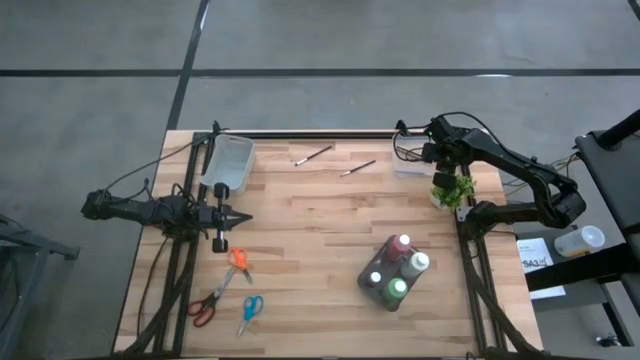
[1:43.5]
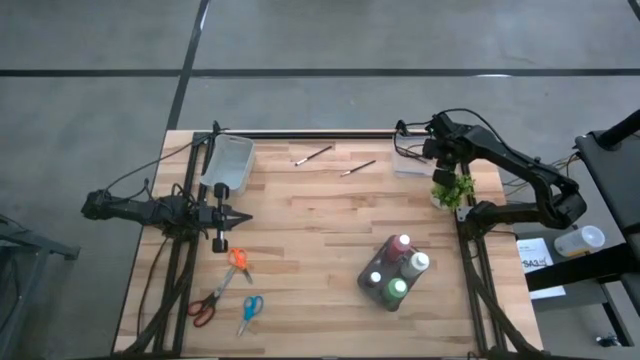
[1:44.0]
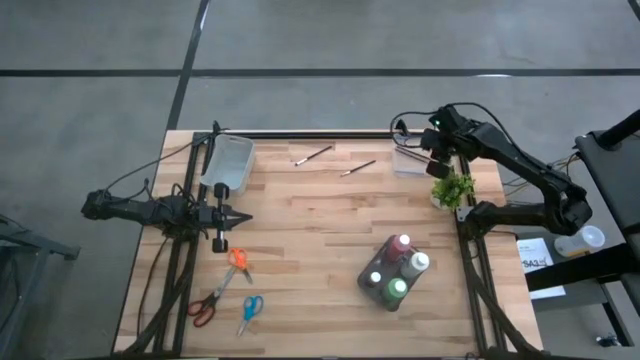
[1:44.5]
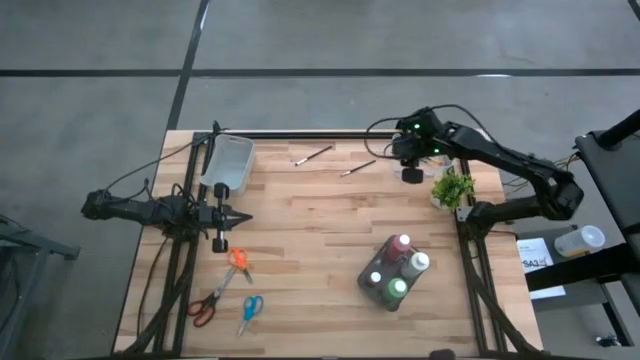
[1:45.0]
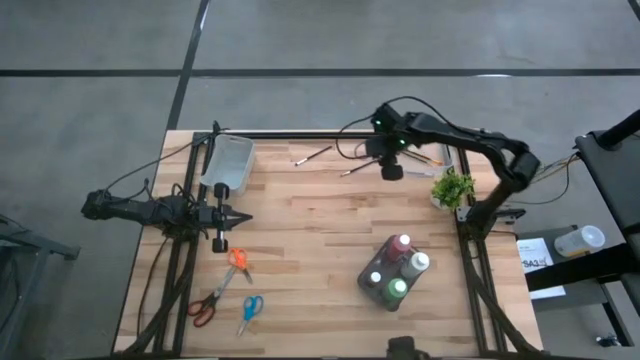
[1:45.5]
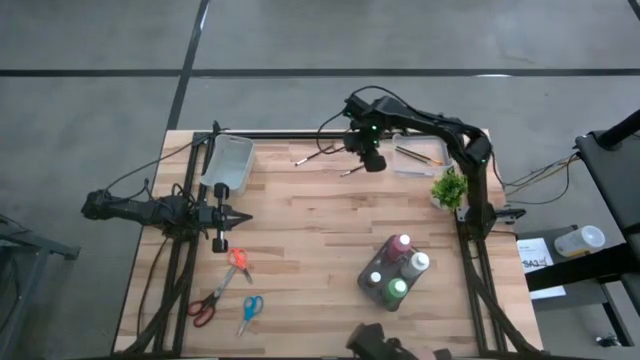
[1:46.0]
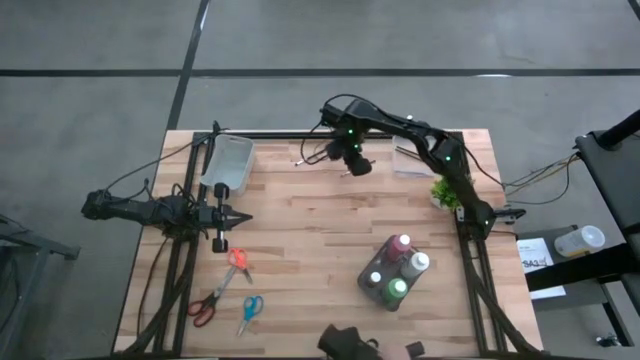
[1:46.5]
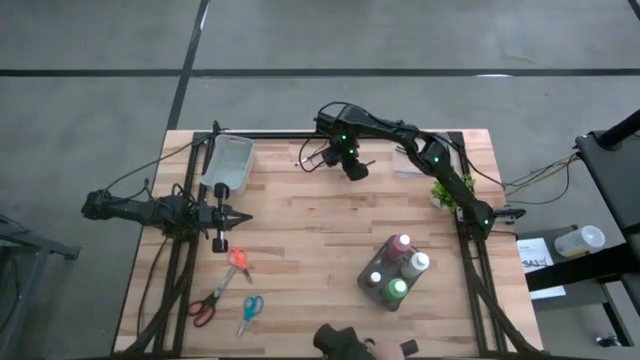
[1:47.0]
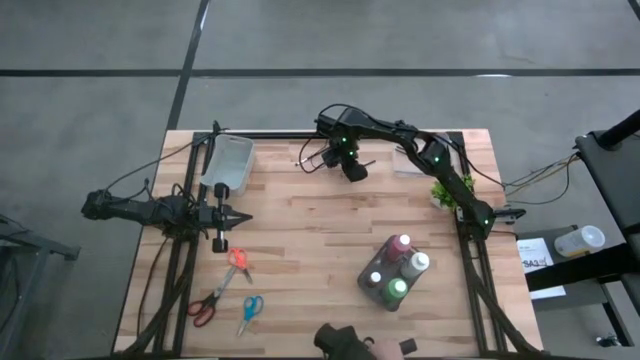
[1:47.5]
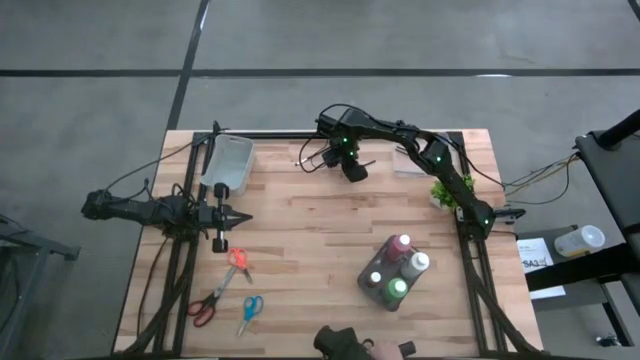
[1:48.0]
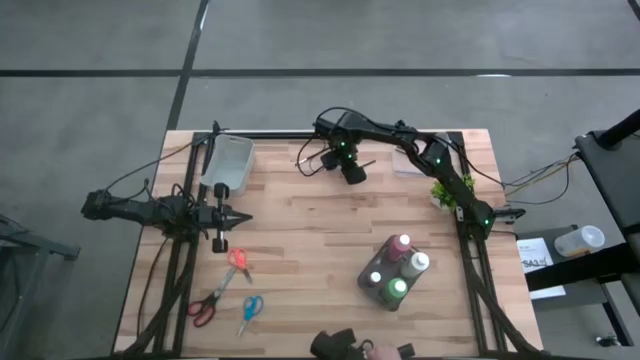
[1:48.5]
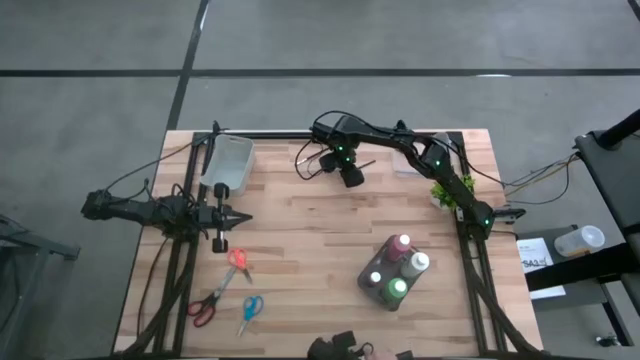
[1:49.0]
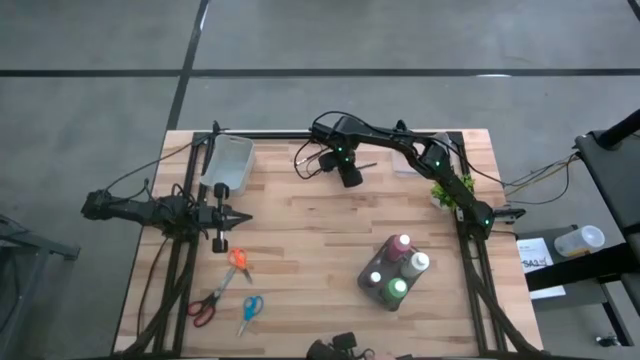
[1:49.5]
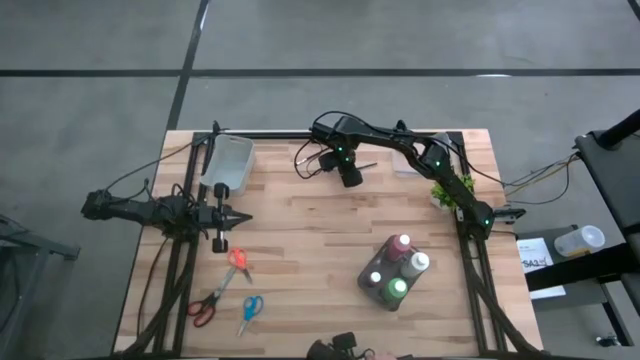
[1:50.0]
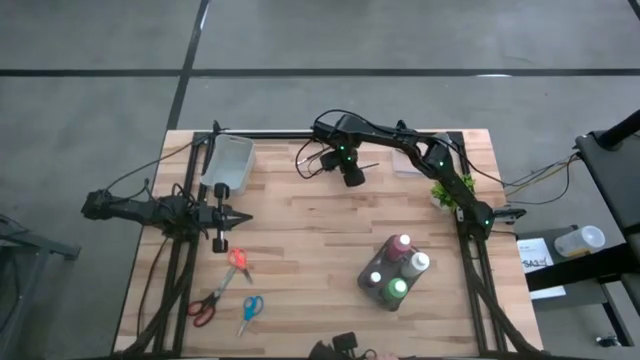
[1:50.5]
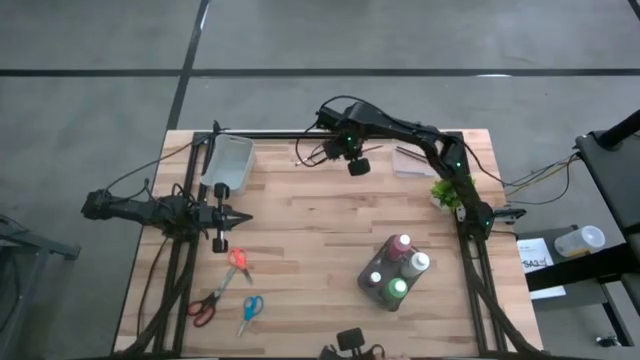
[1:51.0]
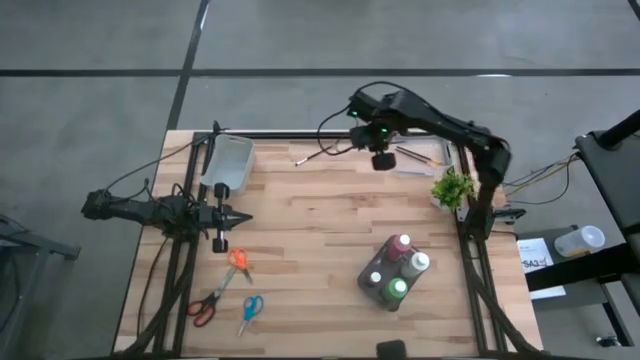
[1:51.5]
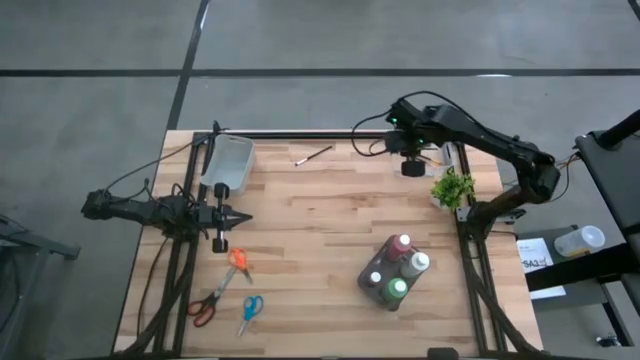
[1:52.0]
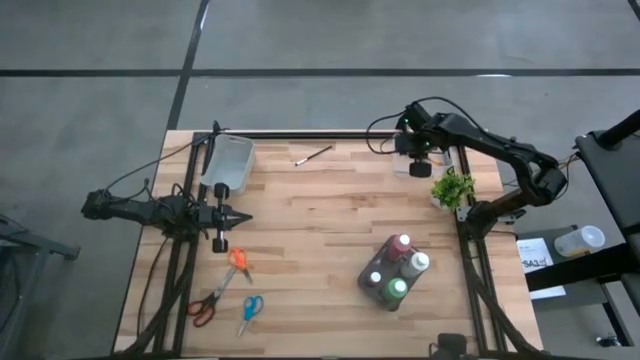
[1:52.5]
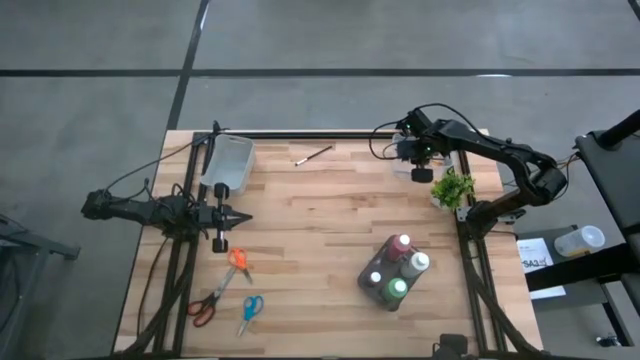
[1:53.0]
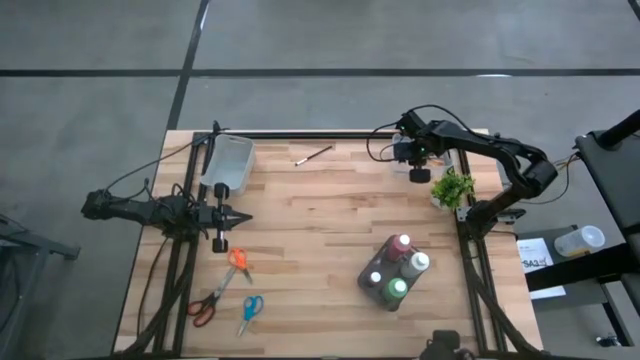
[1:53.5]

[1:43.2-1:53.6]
Task: Pick & Place Paint Supplies
Put the right paint brush into the transparent bin

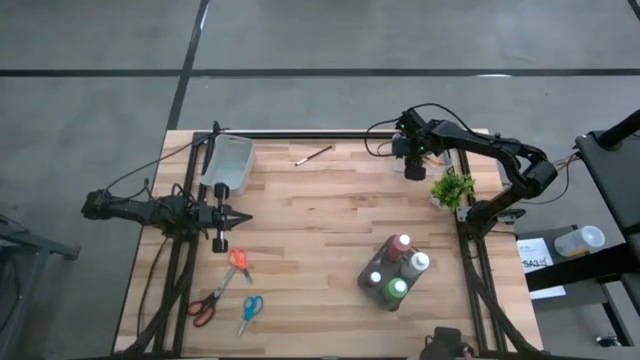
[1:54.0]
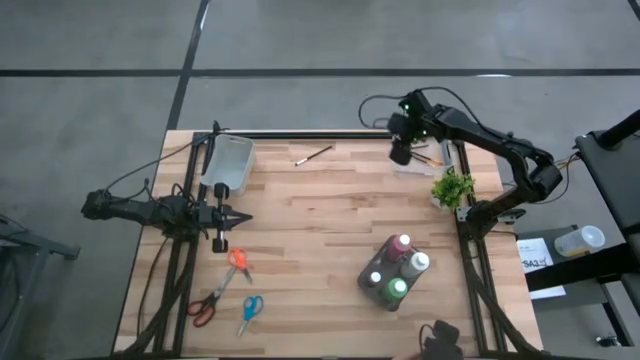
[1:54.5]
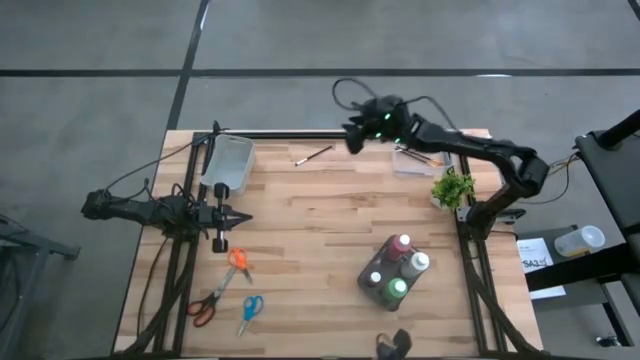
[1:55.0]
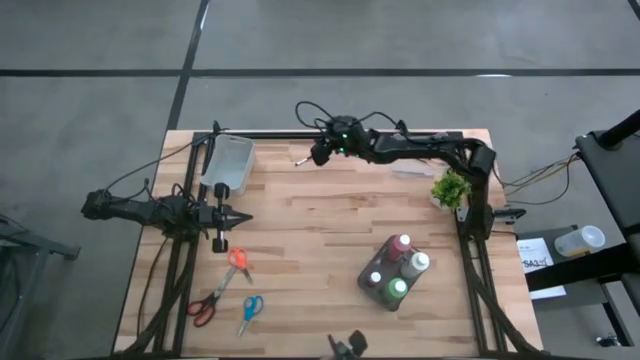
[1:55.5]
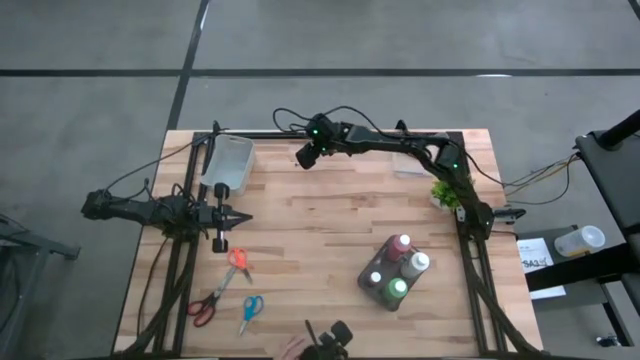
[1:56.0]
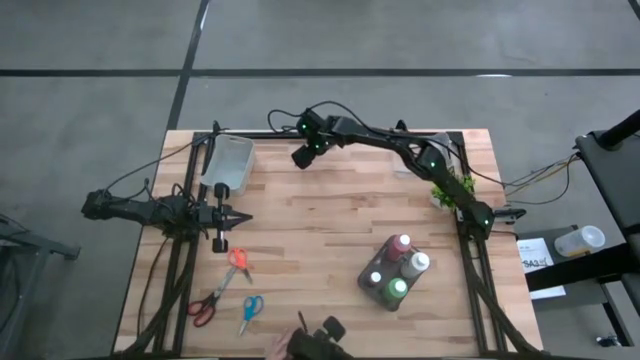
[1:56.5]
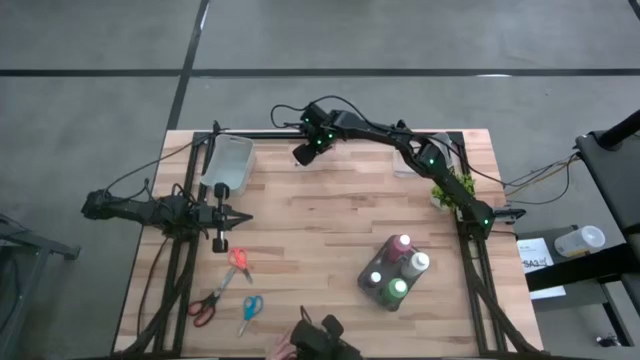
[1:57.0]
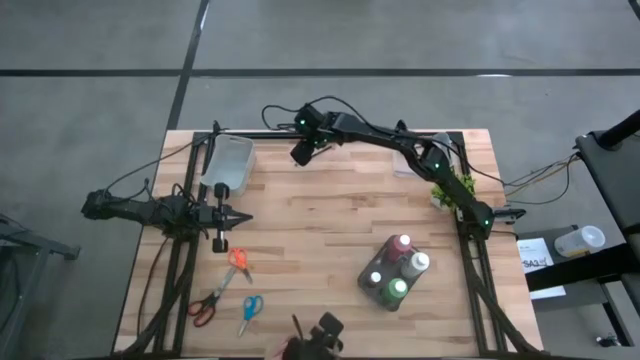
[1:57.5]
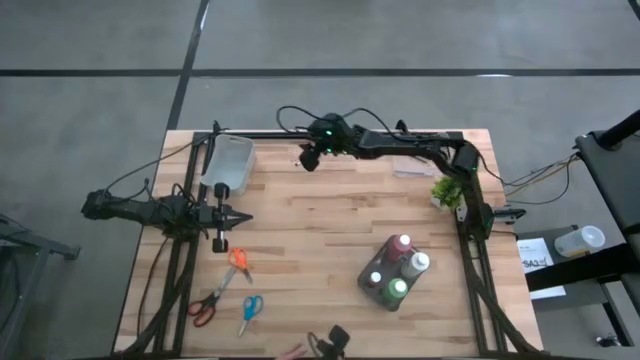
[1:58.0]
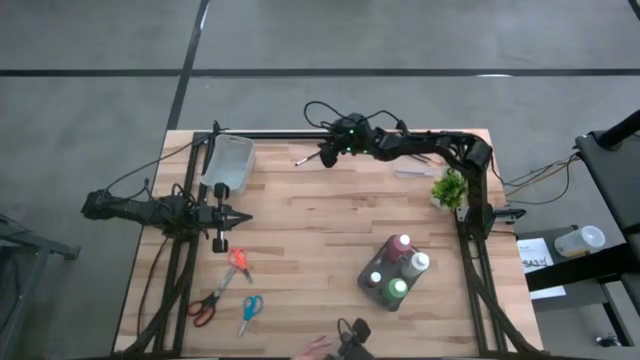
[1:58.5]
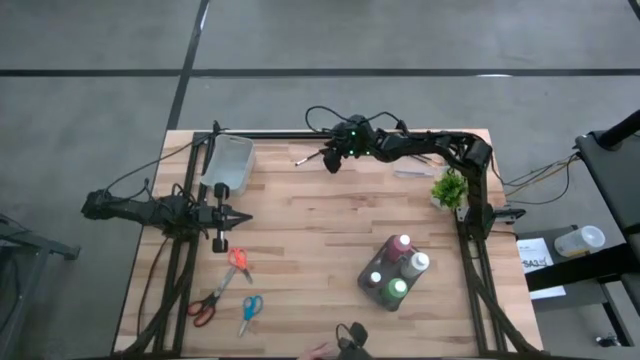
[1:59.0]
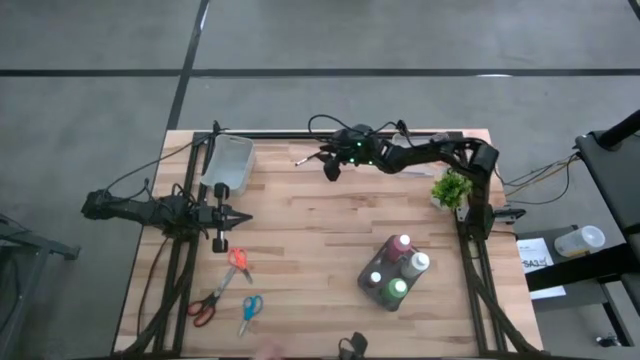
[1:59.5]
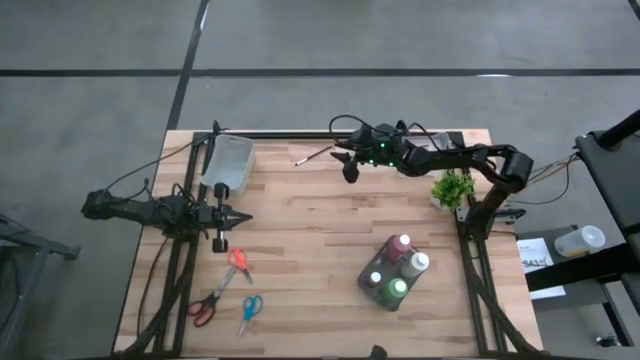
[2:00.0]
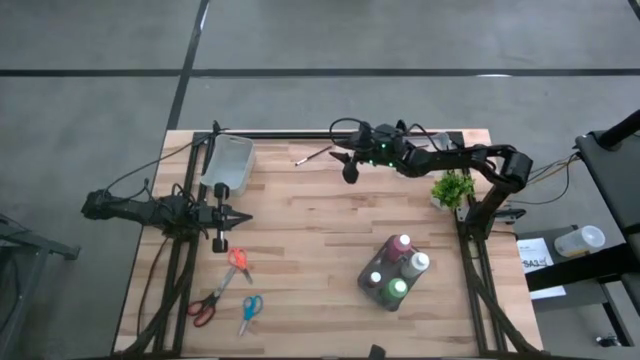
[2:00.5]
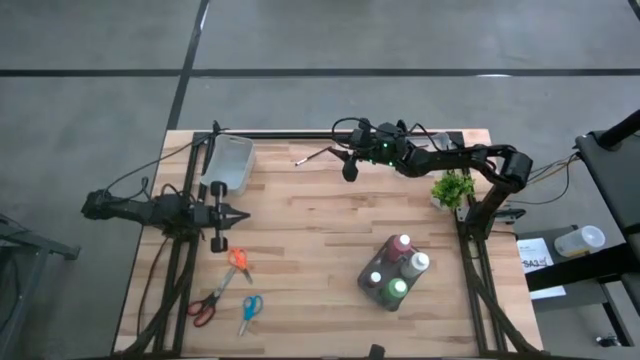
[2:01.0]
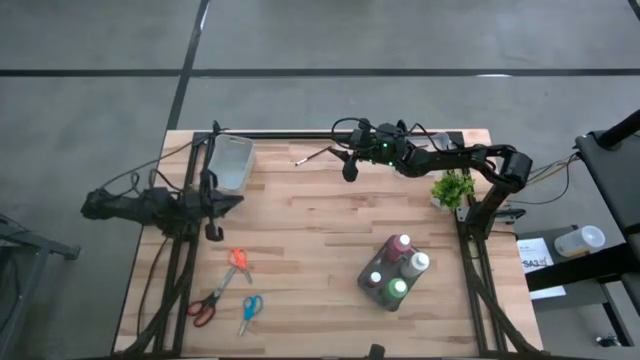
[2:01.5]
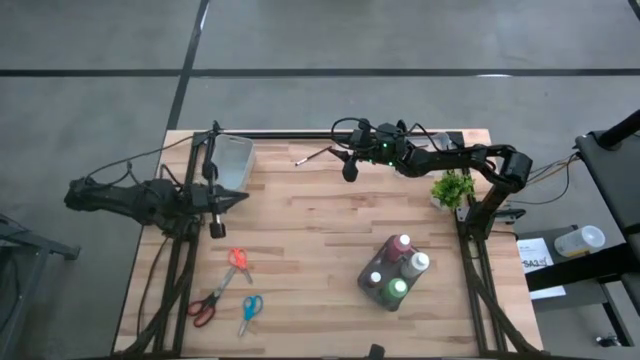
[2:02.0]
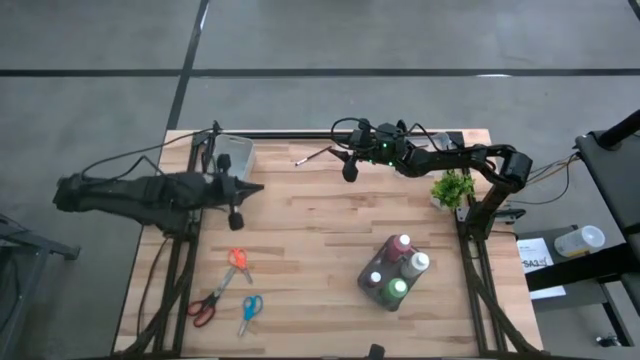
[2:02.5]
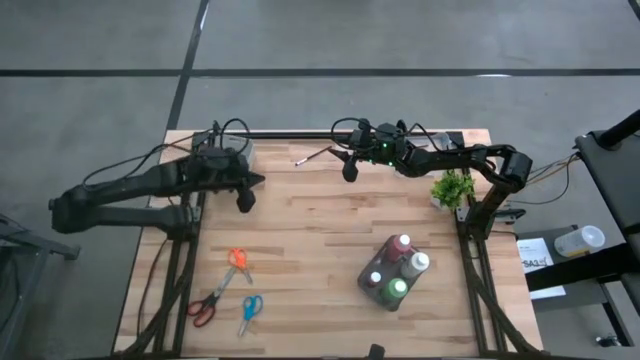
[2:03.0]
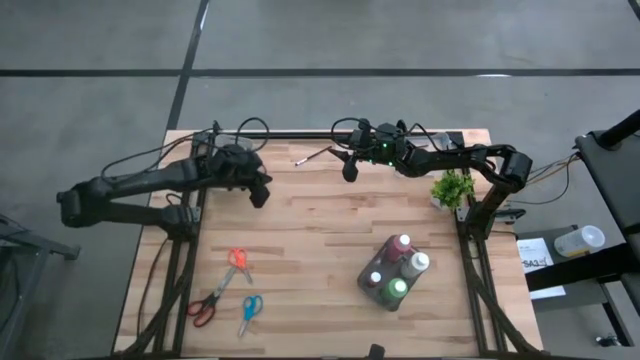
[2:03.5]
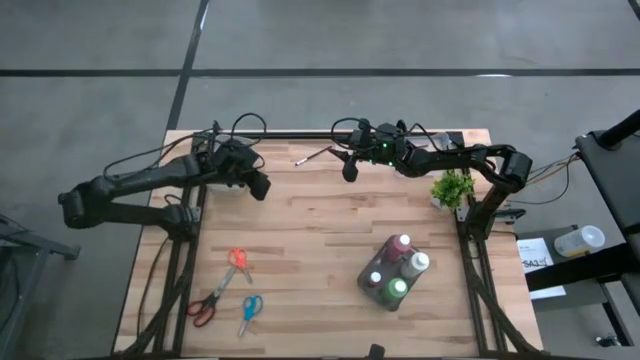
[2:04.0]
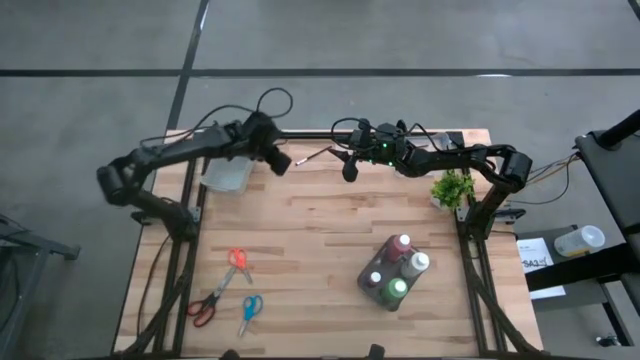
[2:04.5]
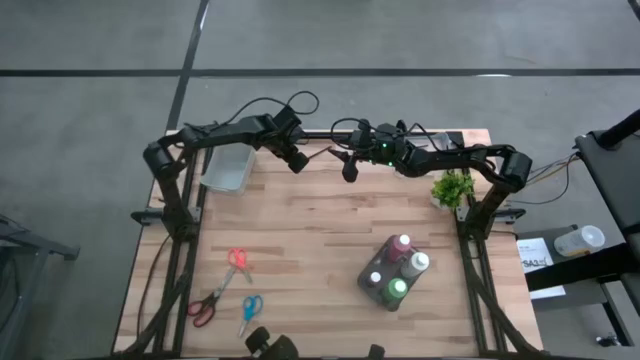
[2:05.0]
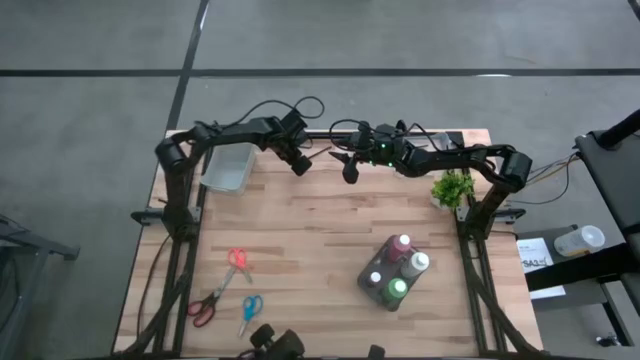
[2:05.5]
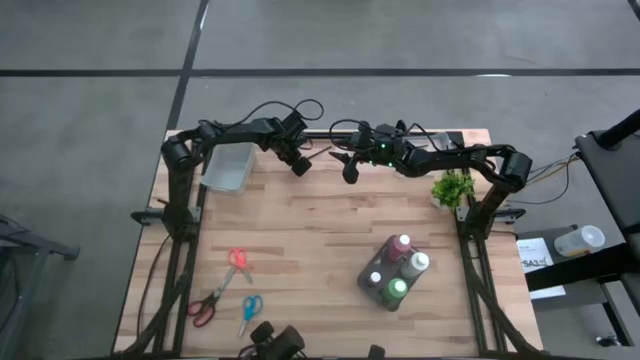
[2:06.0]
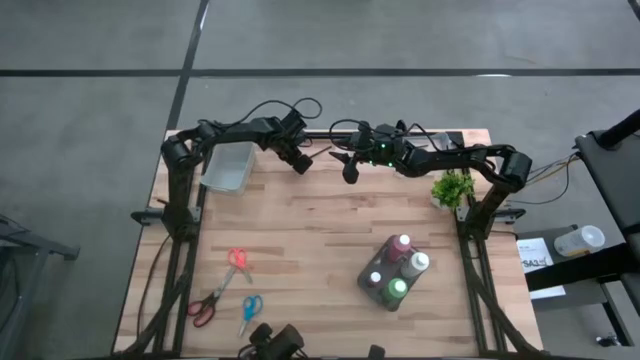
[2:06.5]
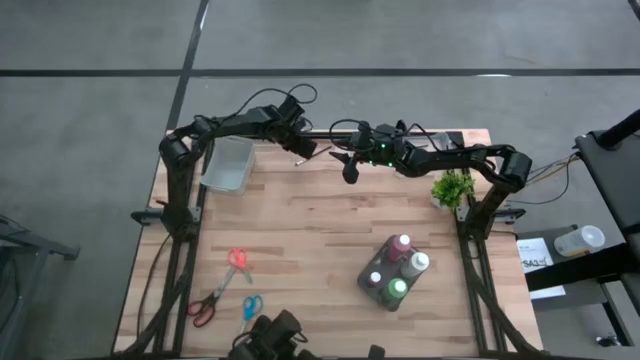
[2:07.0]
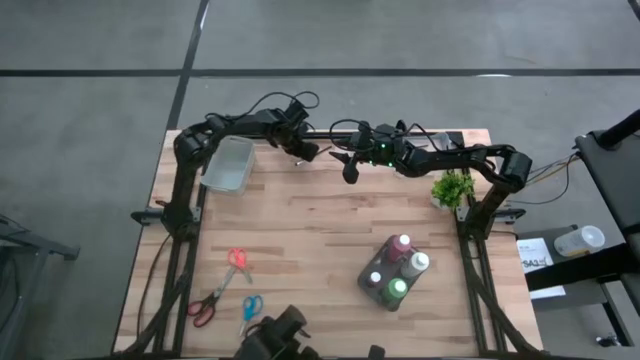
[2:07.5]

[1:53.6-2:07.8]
Put the paint brush into the transparent bin
